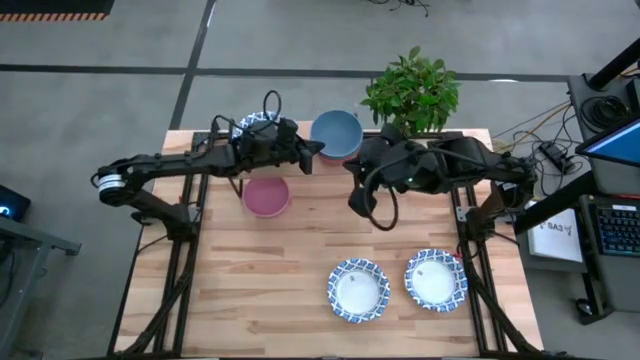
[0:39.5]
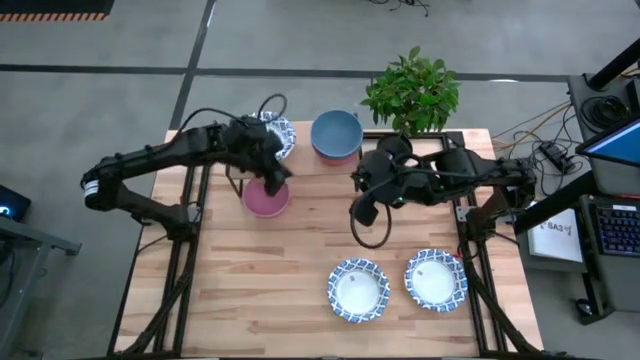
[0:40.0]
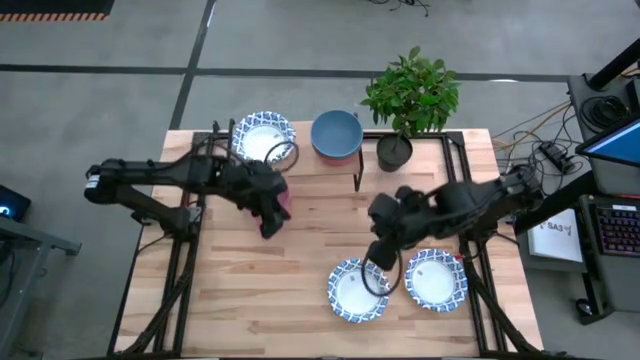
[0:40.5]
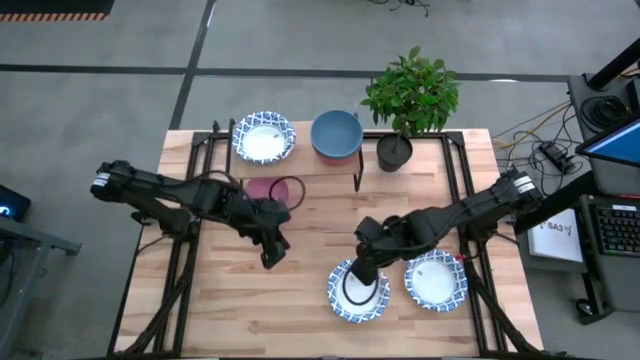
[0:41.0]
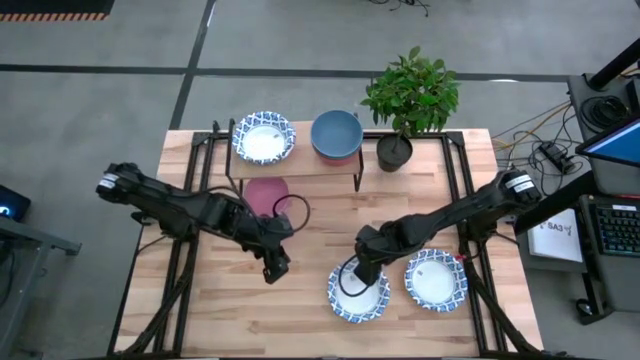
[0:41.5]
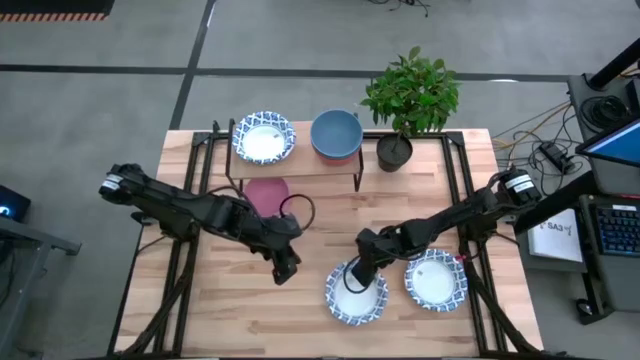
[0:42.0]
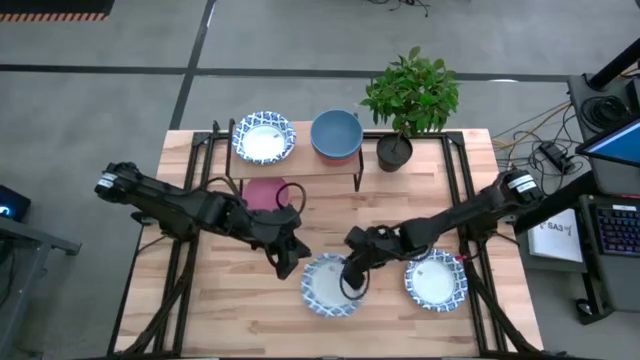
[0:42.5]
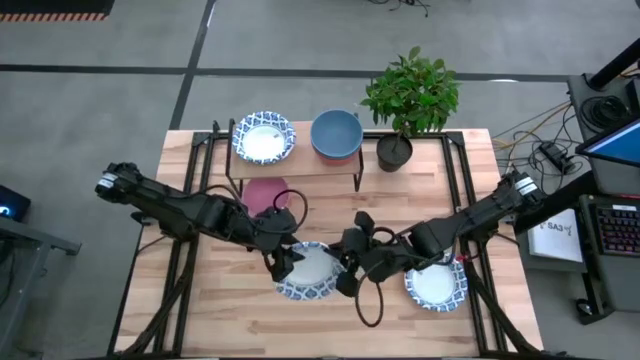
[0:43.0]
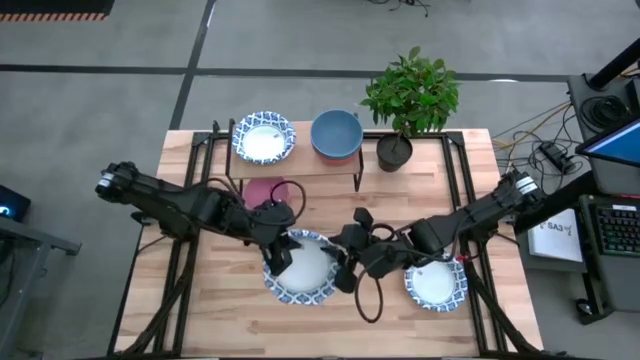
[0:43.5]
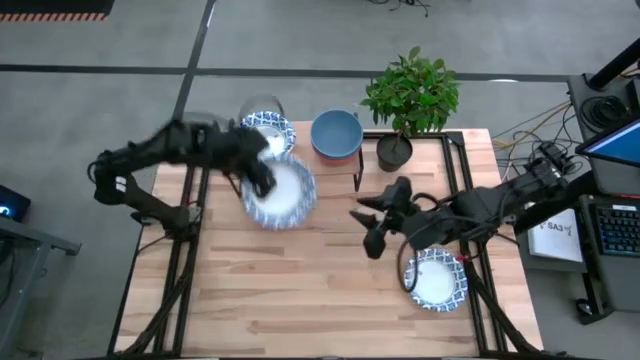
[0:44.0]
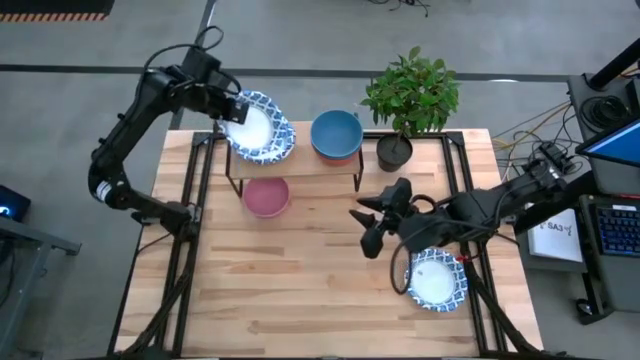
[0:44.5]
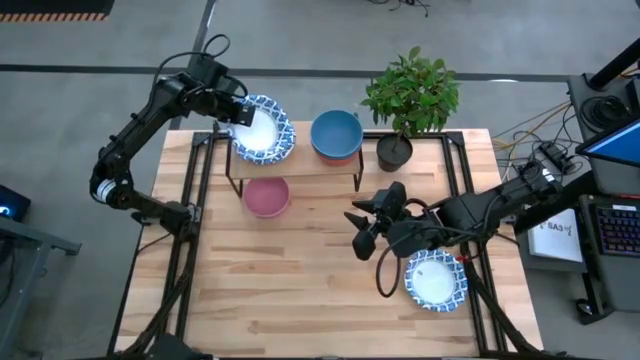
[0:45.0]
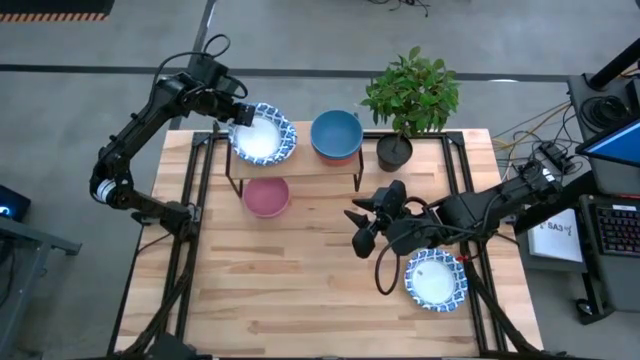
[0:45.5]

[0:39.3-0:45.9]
Task: Place and stack bowls onto a shelf
Stack the white pattern paper bowl on top of the white pattern paper bowl on the shelf

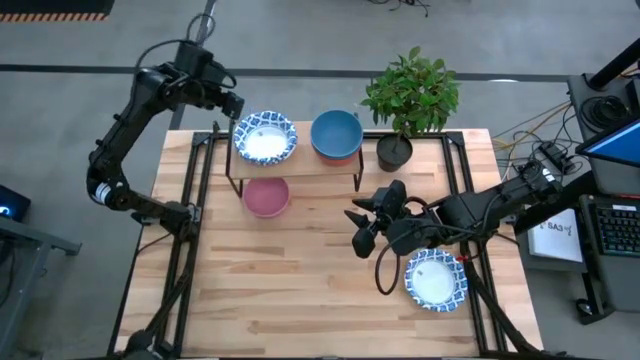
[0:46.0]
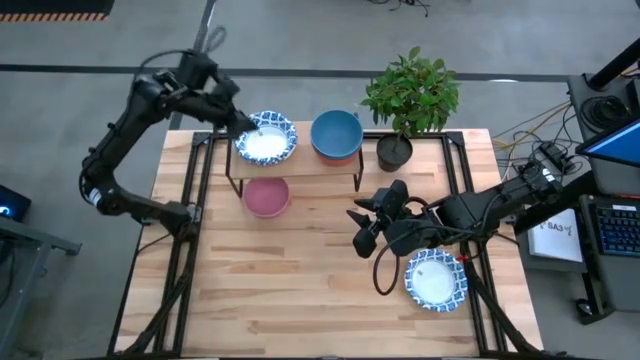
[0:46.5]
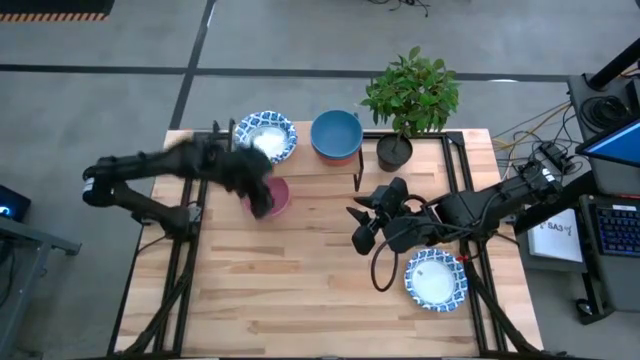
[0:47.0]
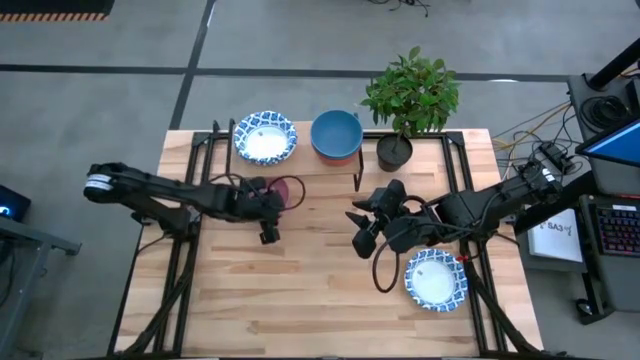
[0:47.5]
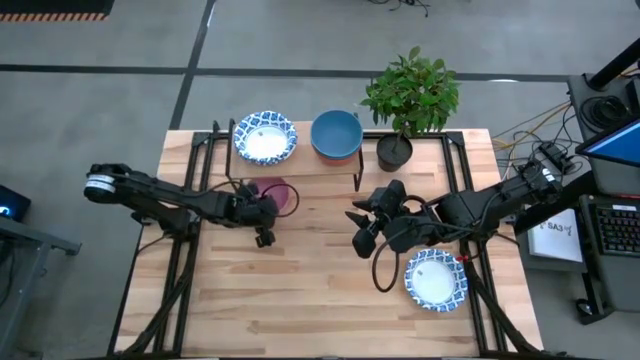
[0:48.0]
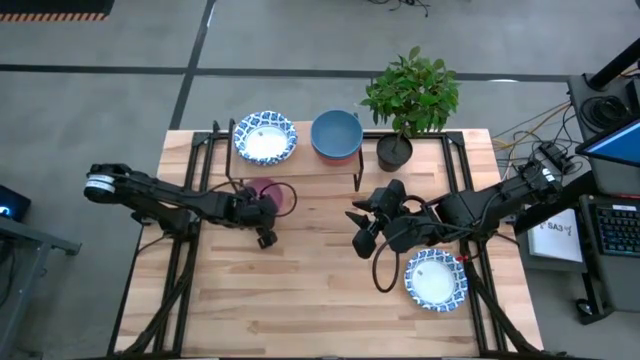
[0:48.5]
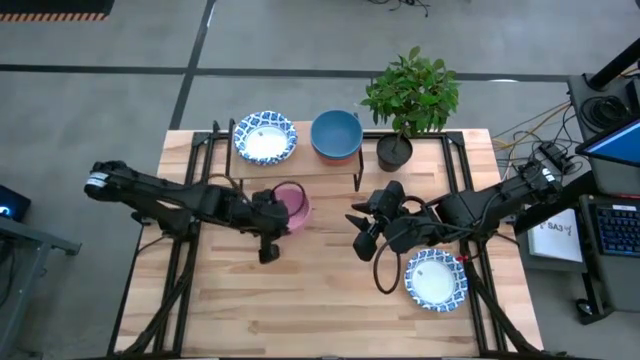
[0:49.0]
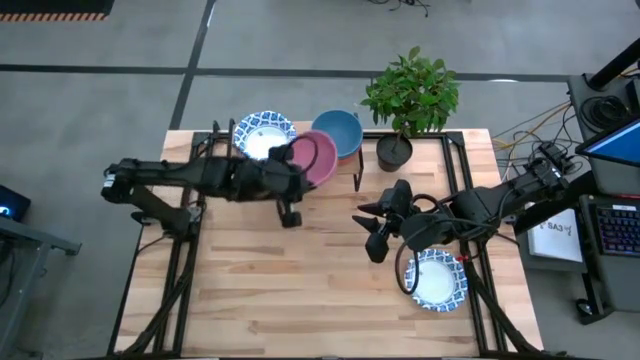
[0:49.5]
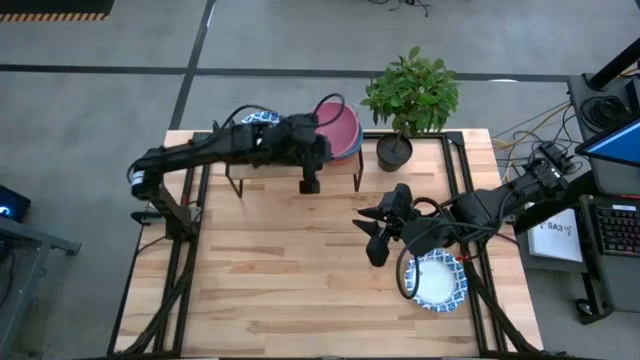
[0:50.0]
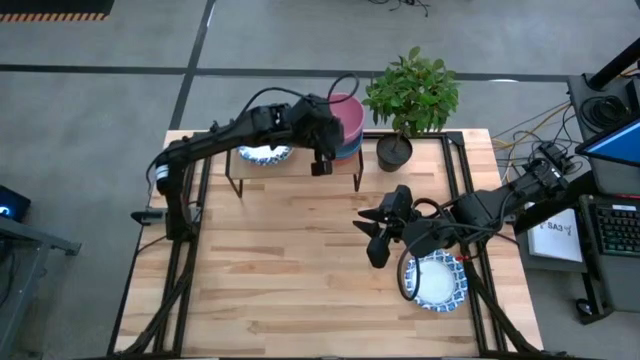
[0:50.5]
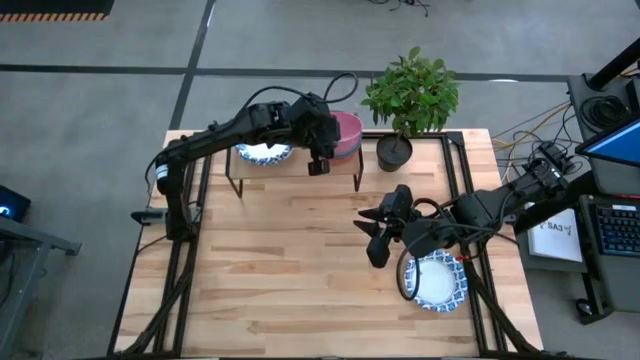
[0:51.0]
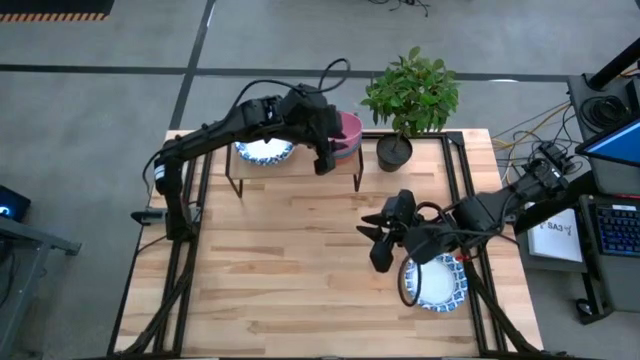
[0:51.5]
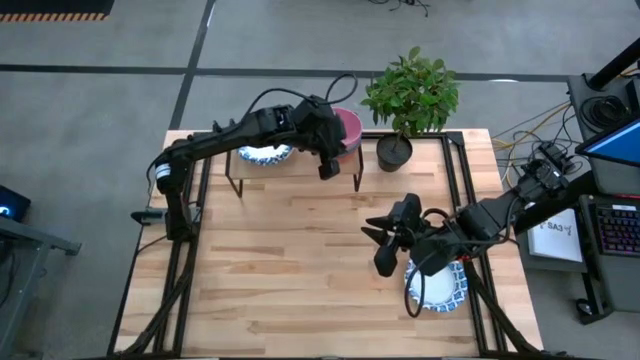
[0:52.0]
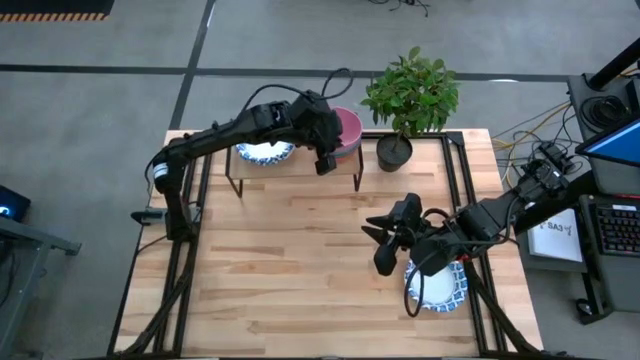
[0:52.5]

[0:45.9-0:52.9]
Stack the pink plastic bowl on top of the blue plastic bowl on the shelf

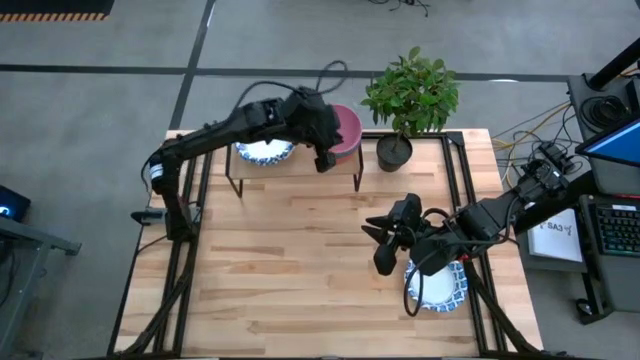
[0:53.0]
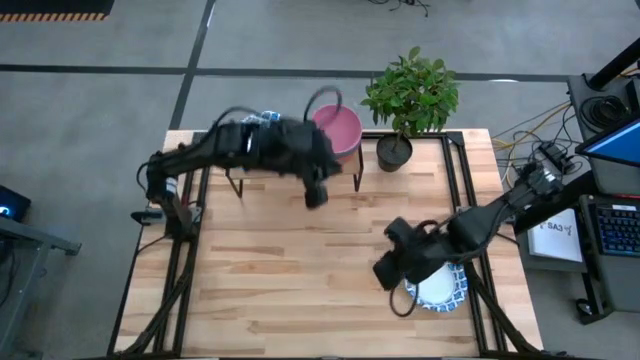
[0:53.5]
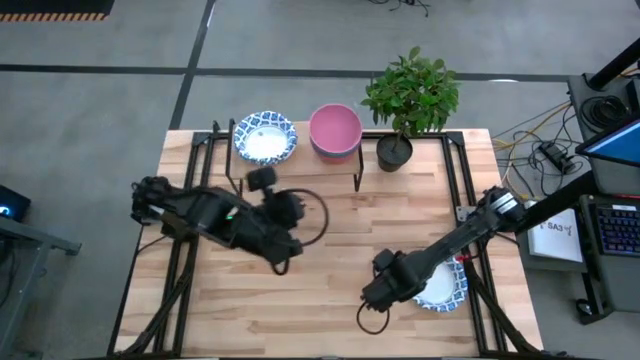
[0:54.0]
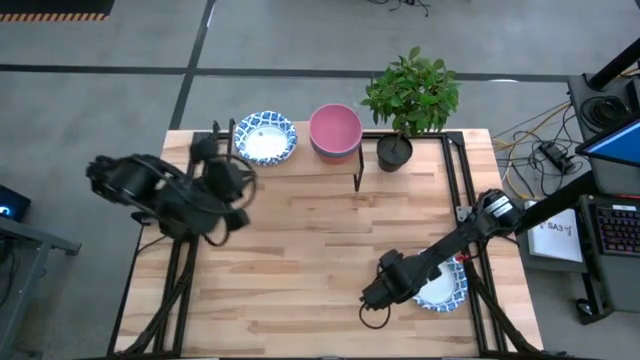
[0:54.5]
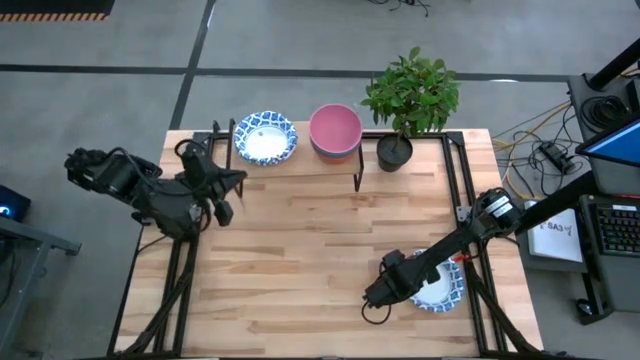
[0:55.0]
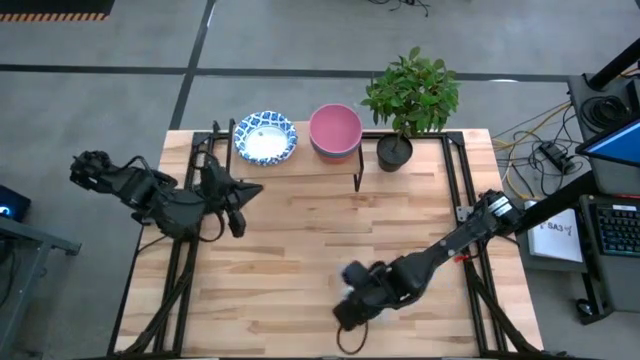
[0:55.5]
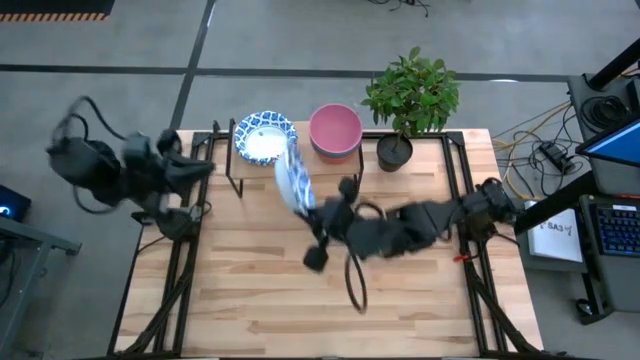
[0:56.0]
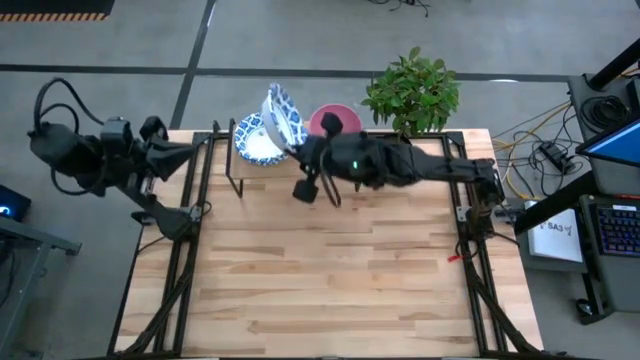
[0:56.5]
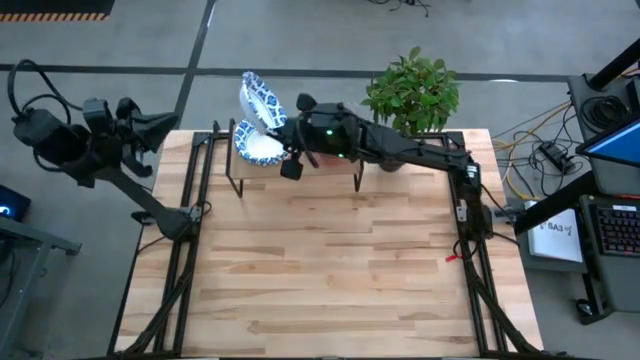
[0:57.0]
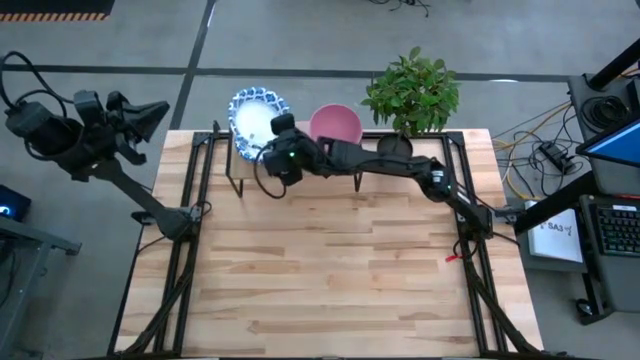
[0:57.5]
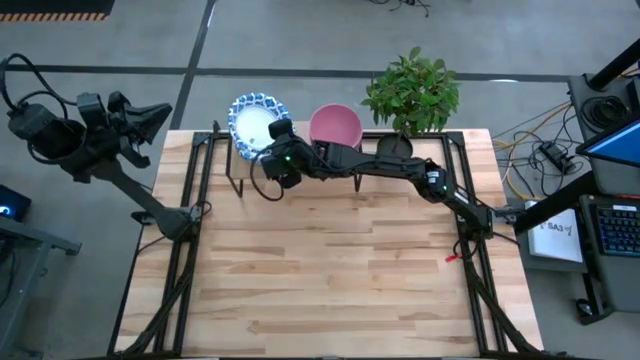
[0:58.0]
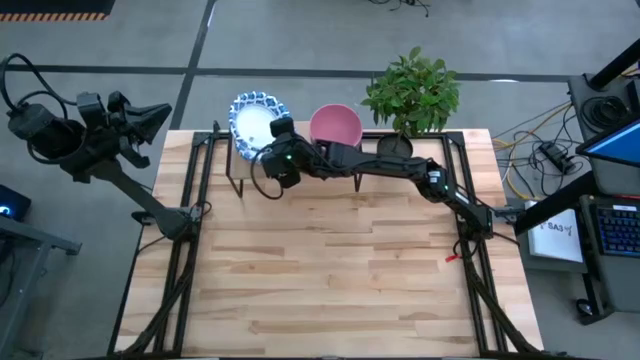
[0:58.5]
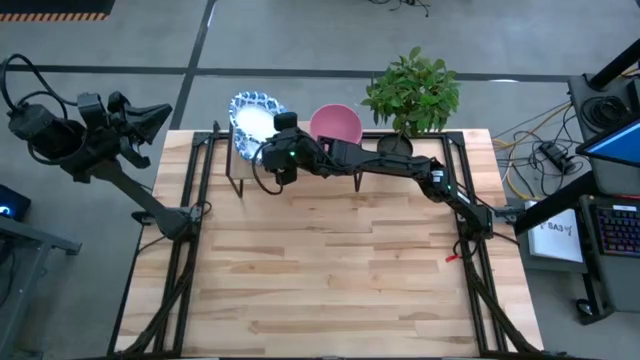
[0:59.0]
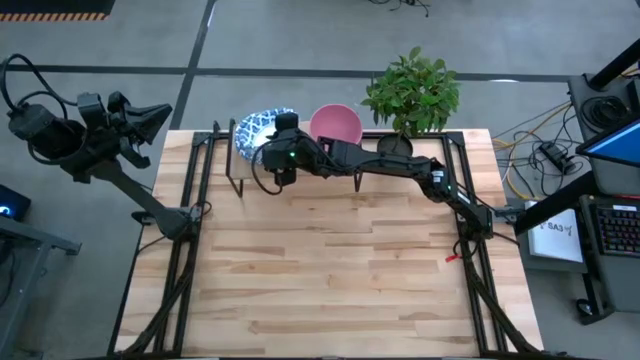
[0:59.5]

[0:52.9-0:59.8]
Stack the white pattern paper bowl on top of the white pattern paper bowl on the shelf

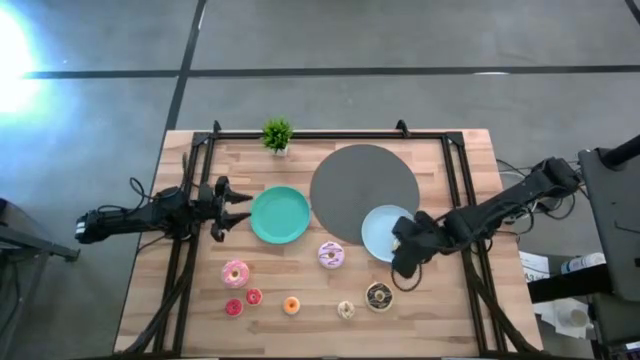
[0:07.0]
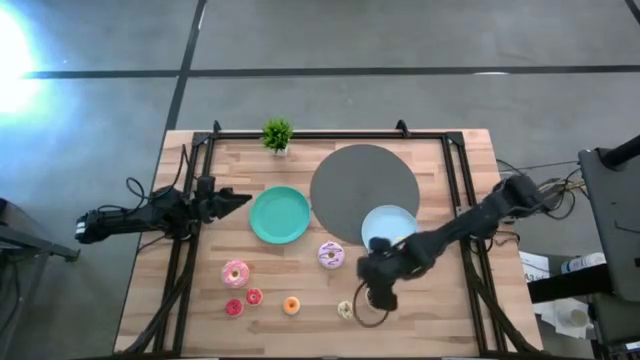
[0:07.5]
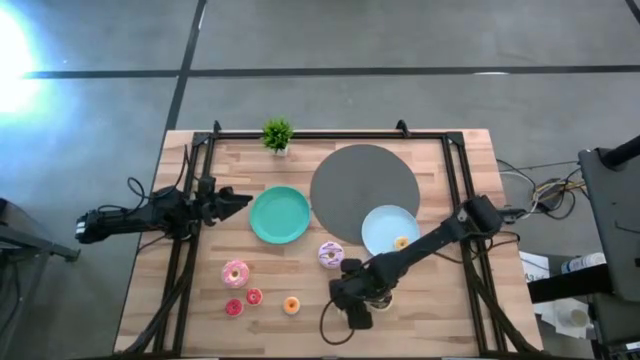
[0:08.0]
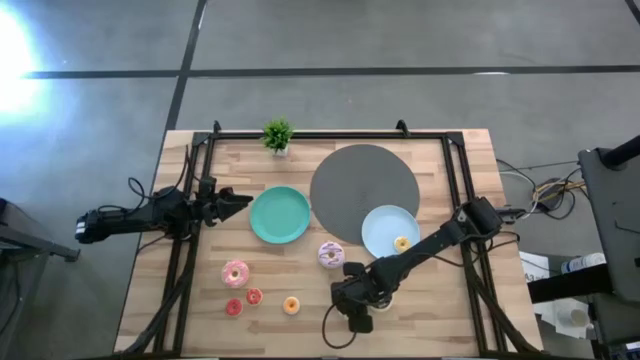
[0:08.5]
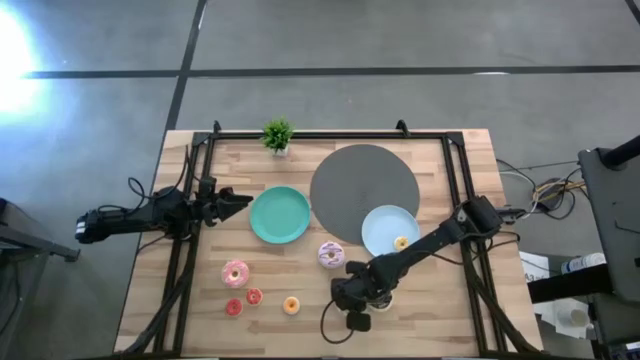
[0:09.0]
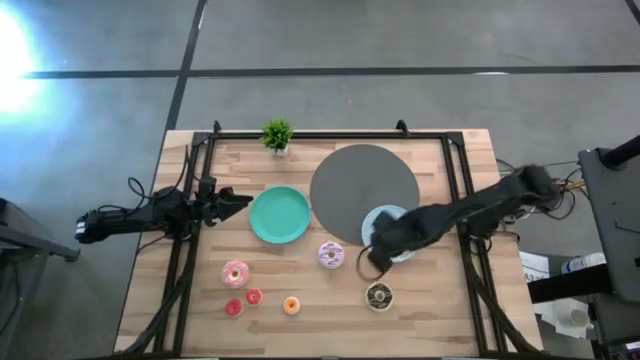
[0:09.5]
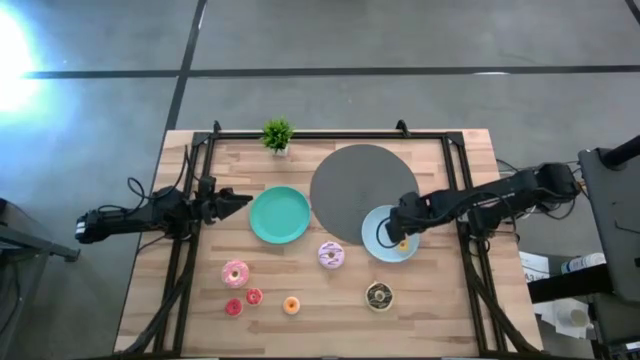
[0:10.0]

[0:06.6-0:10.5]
Task: Pick & Place donuts
Put the small white donut on the blue plate
